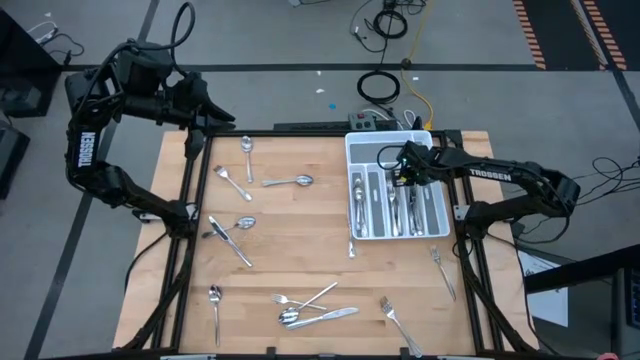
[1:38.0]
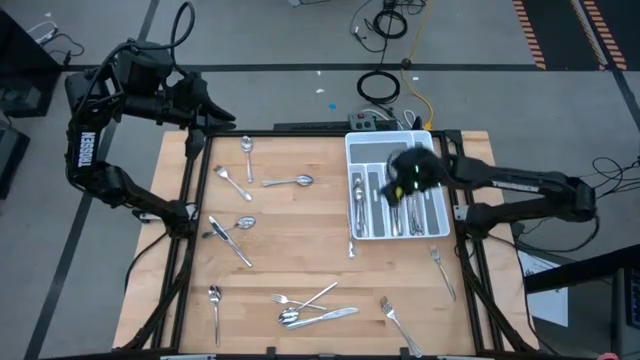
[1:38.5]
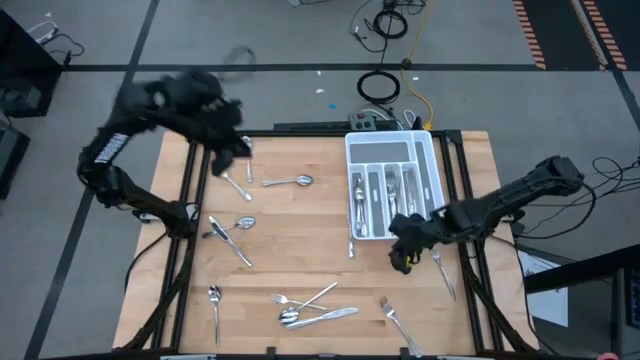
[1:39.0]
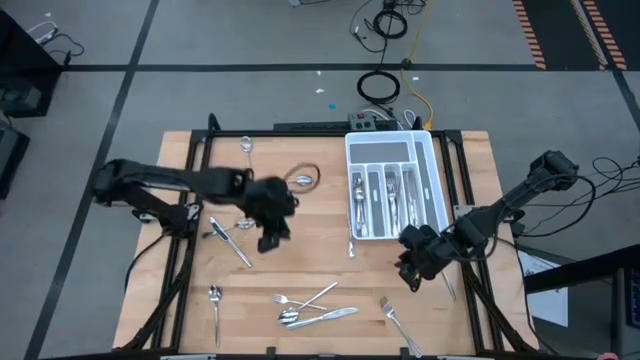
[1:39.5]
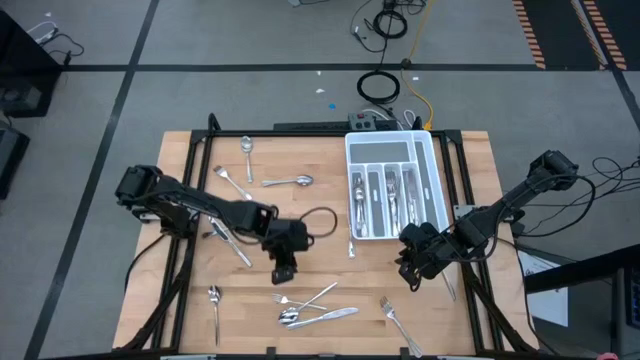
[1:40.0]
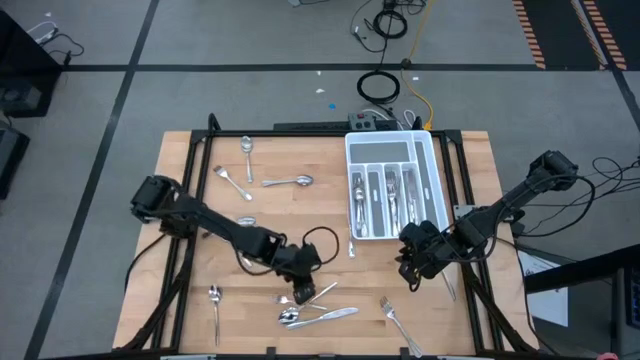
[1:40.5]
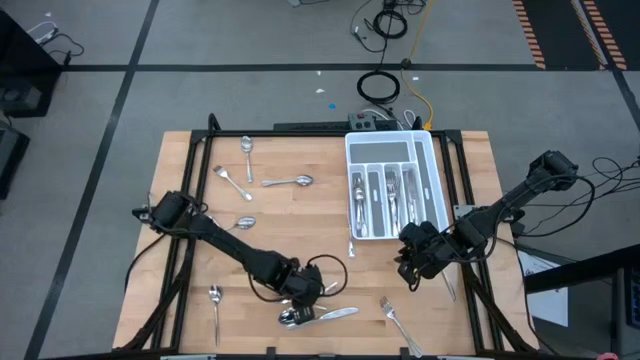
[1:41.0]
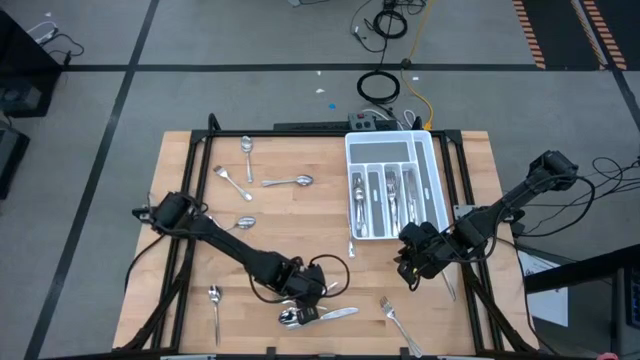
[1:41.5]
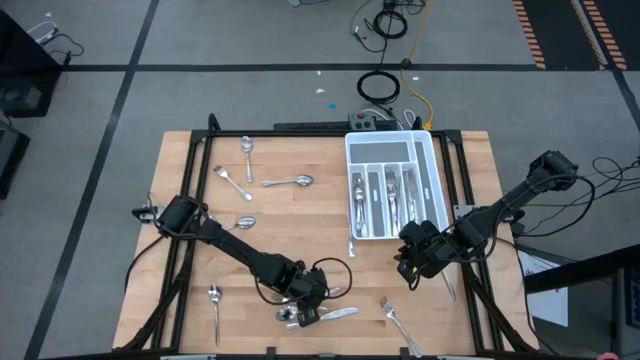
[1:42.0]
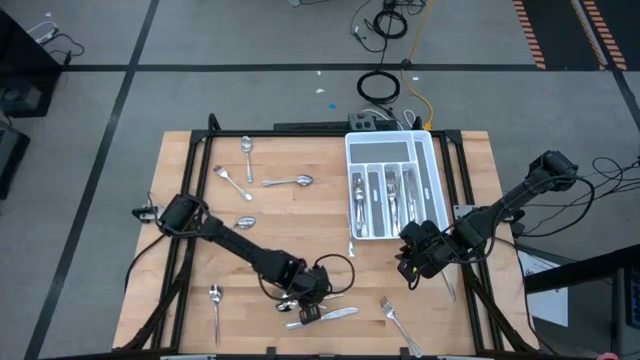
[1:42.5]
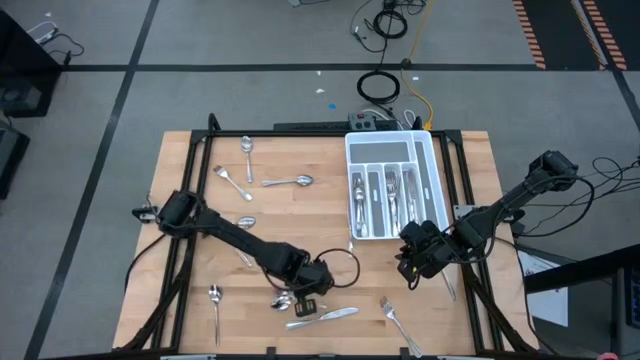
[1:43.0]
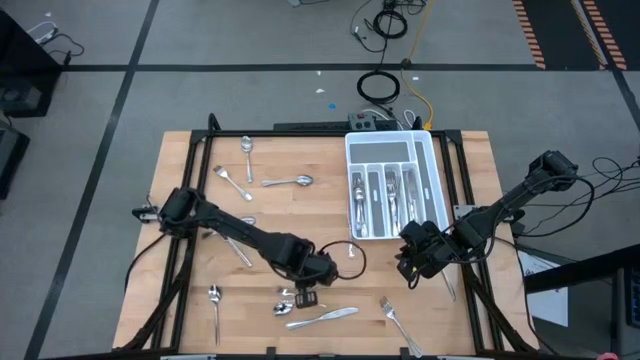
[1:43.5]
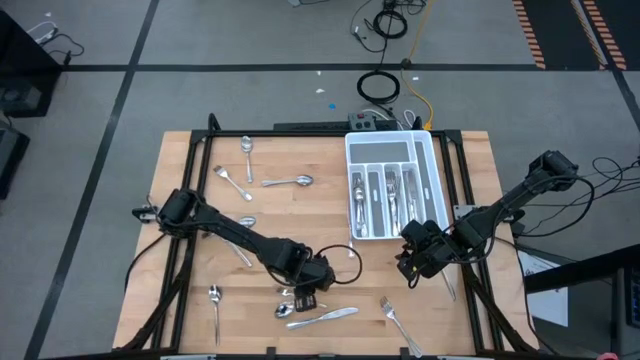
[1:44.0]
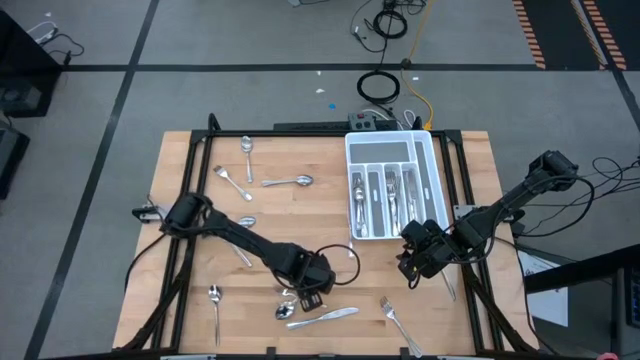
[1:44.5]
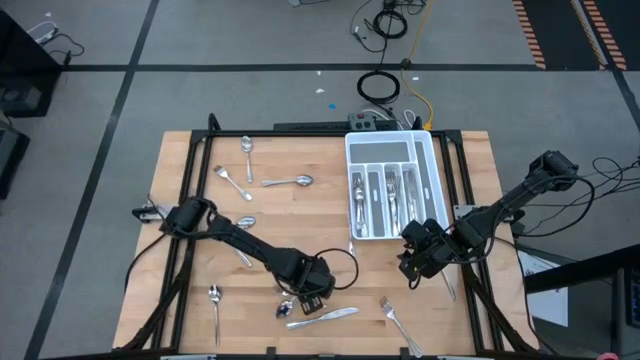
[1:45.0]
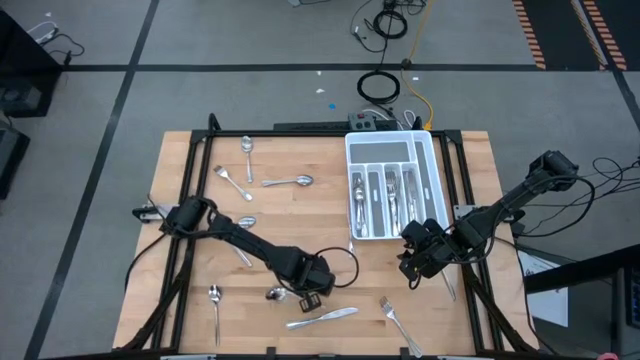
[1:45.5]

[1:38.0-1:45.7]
Task: Sort silverware
Put the silver spoon into the white silverware tray

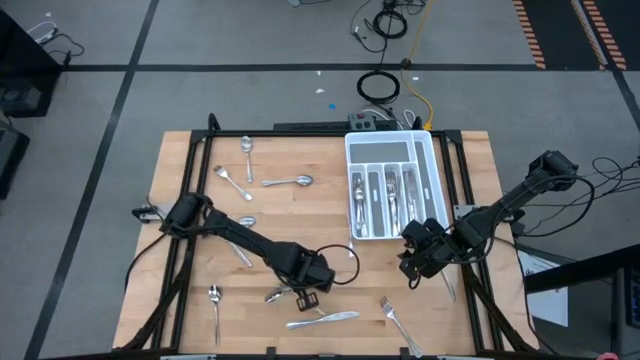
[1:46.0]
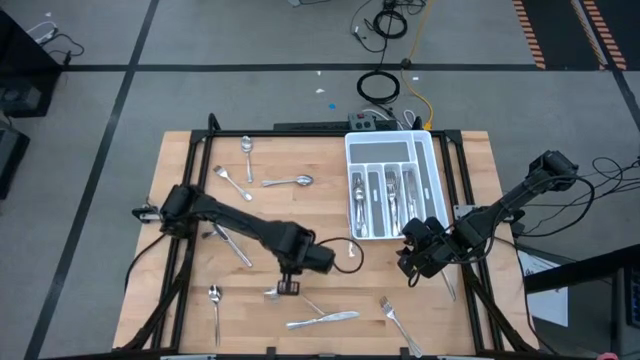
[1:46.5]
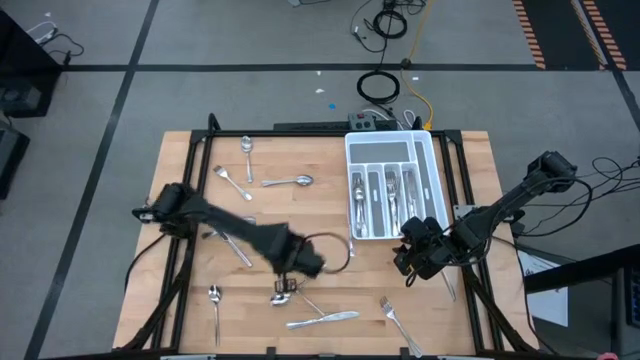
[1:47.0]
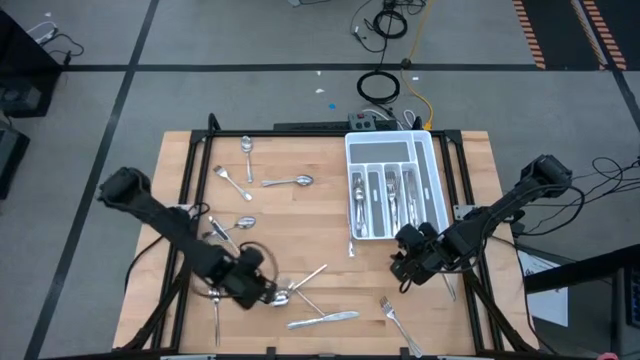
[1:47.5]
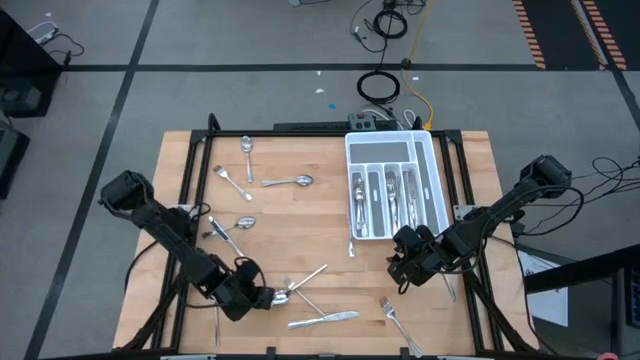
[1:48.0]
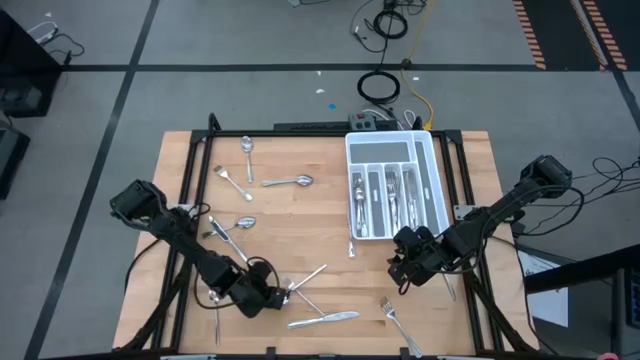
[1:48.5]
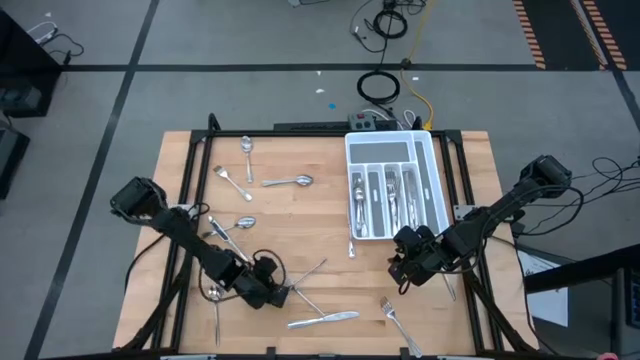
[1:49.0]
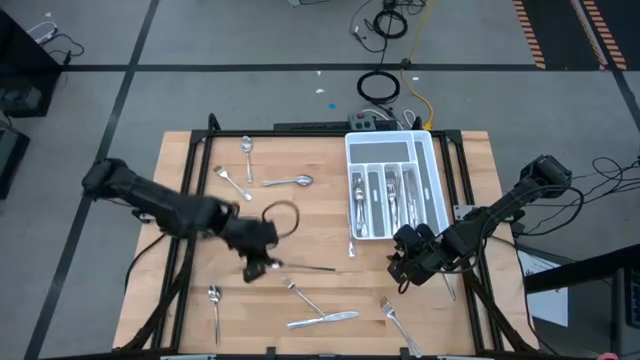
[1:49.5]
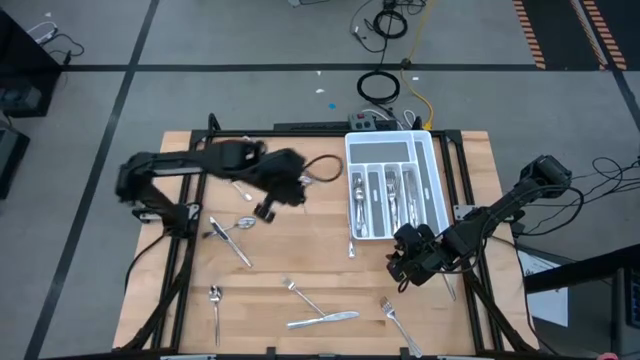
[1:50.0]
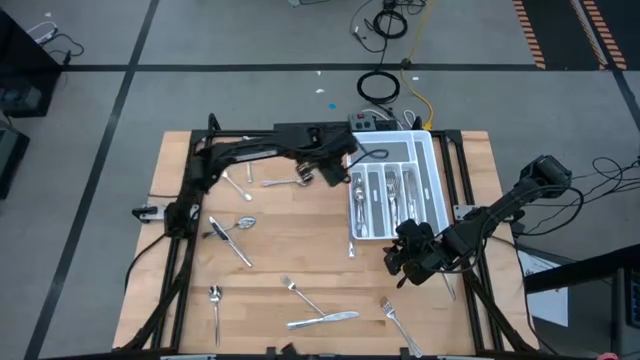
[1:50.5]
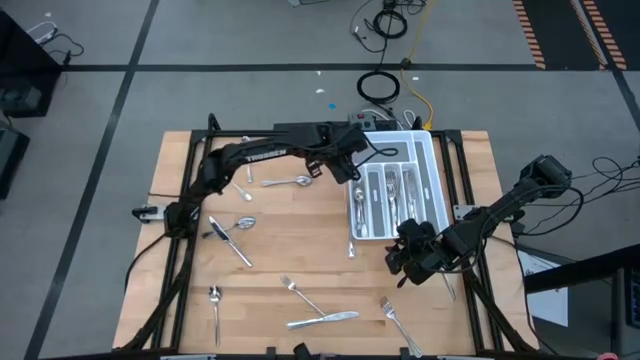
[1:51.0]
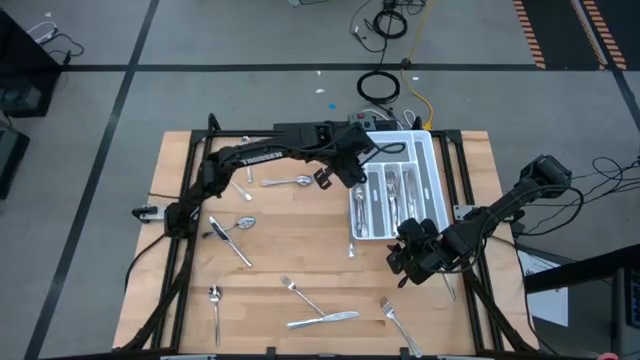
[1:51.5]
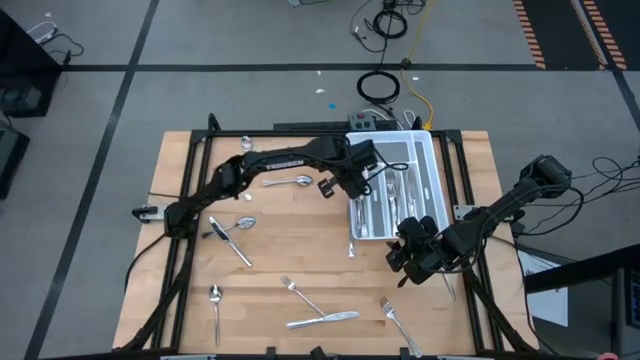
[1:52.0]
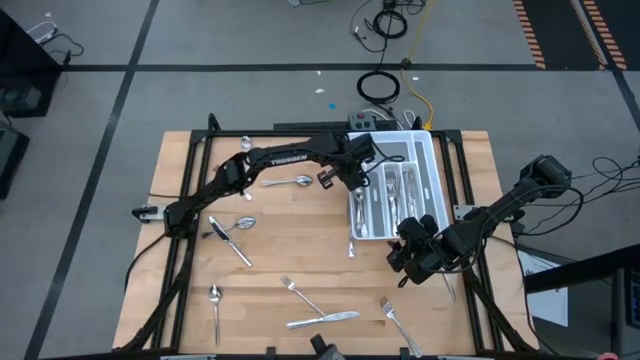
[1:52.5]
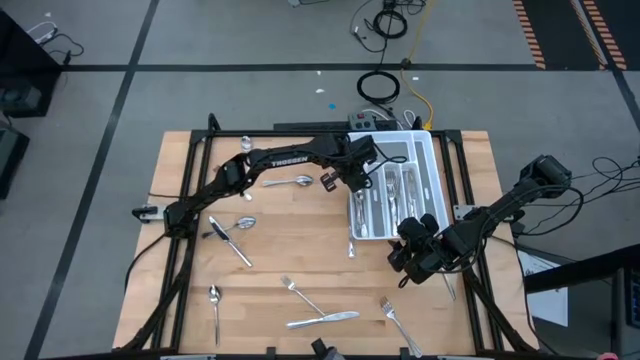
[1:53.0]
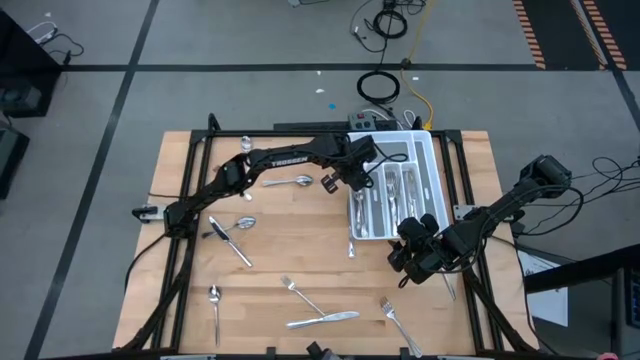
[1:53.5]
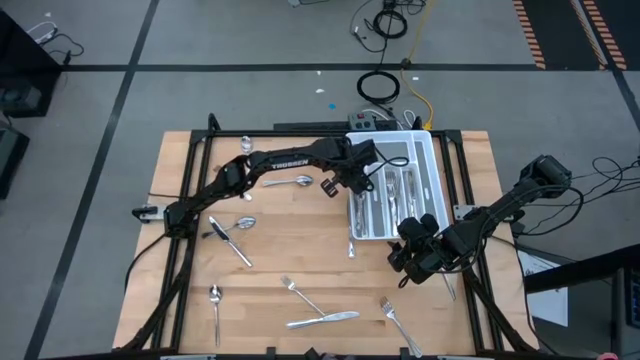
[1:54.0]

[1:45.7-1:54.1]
Put the silver spoon into the white silverware tray

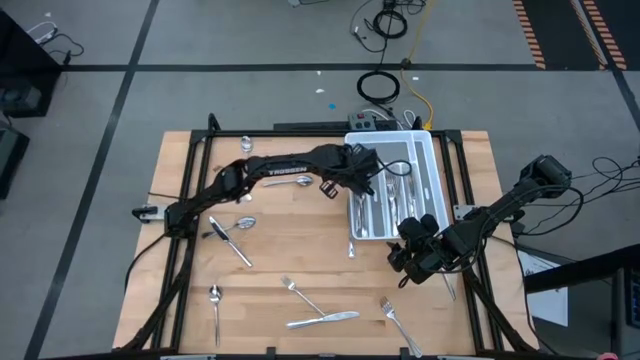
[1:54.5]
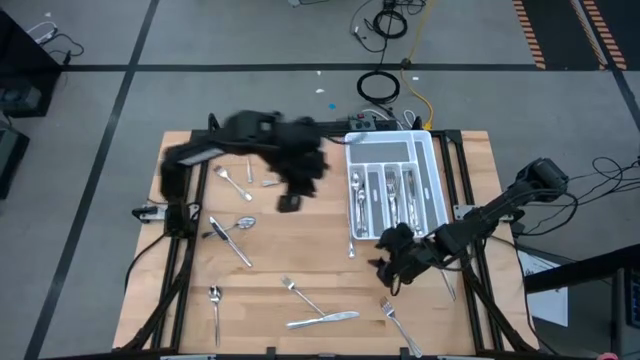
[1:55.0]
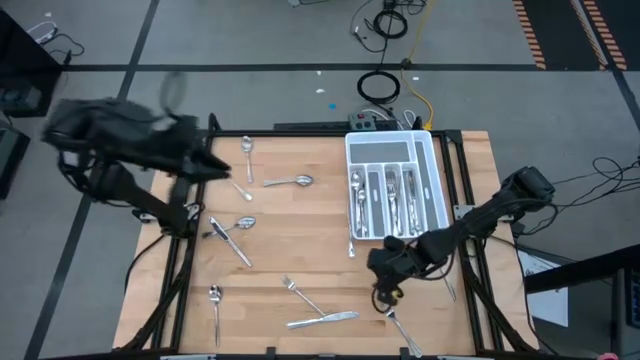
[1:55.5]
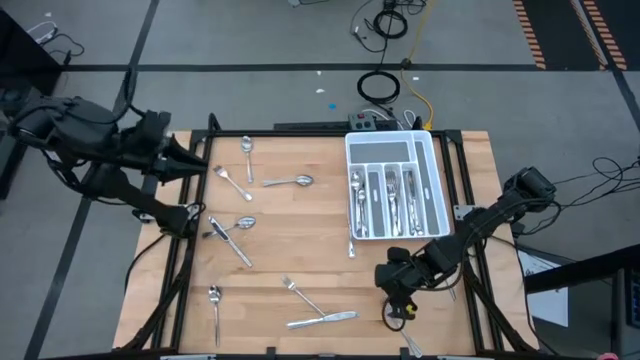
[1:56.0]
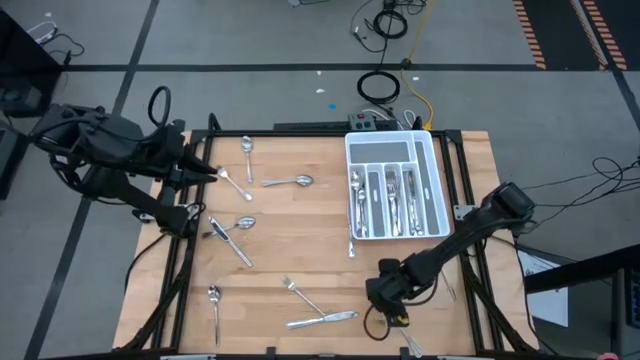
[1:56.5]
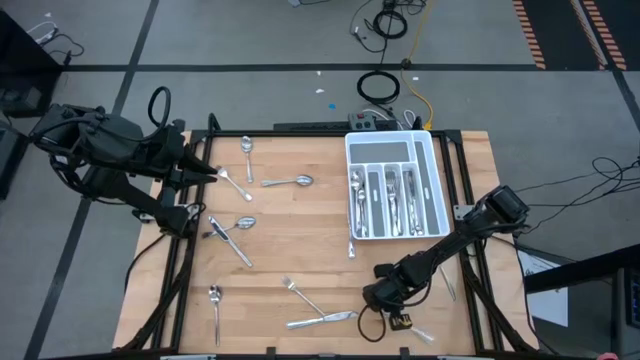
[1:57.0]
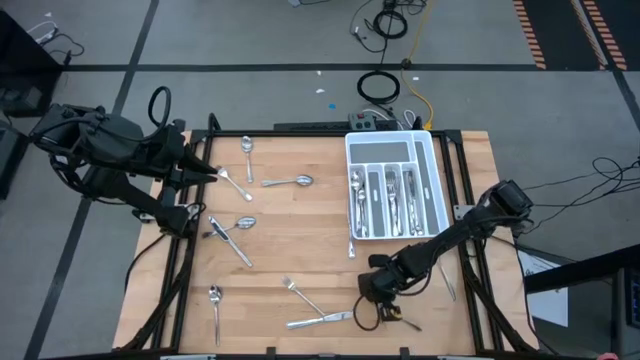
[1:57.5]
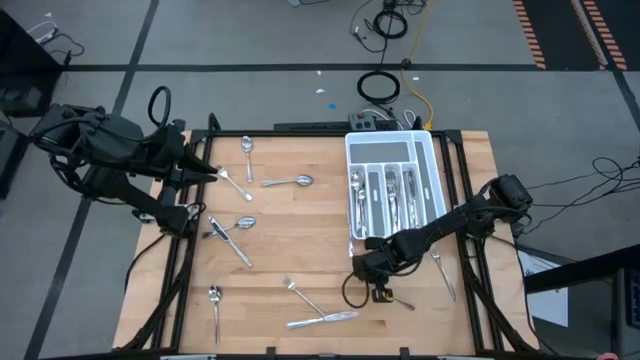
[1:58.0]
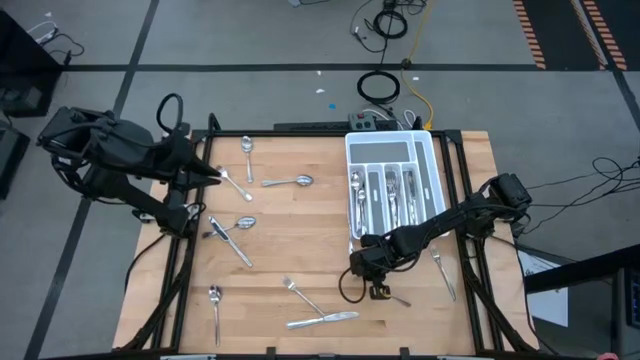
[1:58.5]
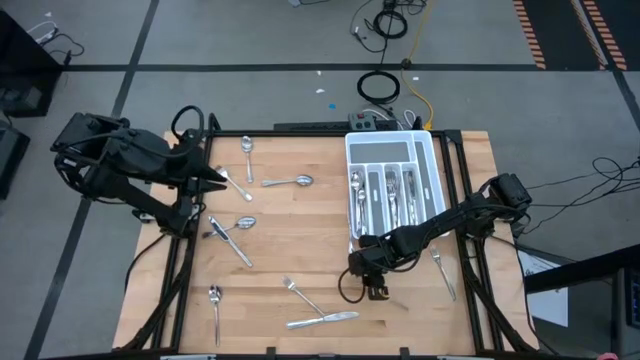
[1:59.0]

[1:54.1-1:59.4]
Put the silver fork into the white silverware tray
